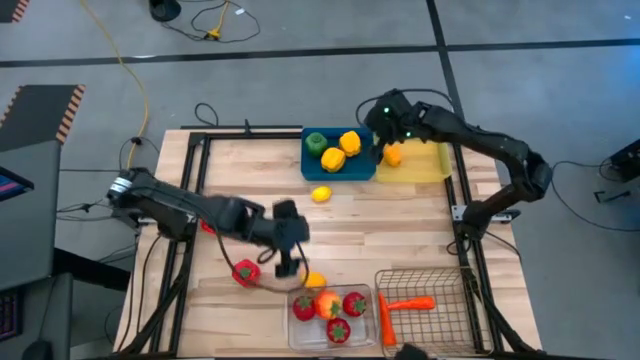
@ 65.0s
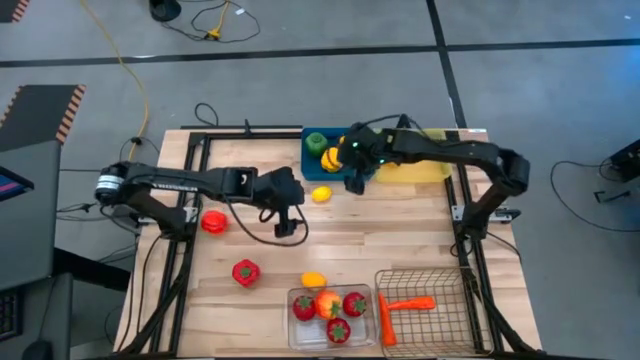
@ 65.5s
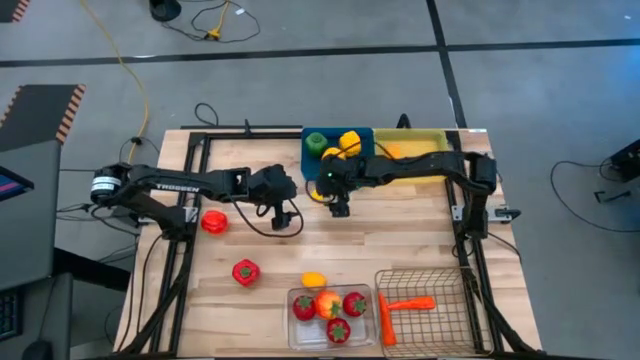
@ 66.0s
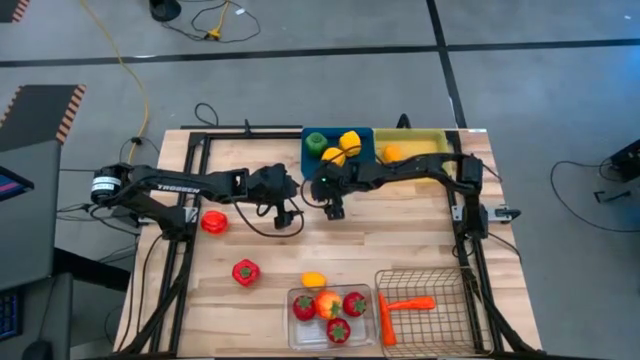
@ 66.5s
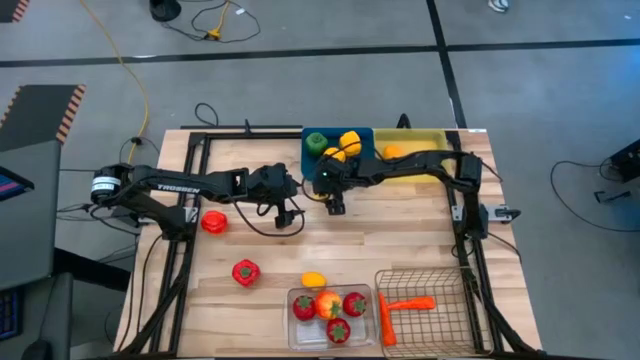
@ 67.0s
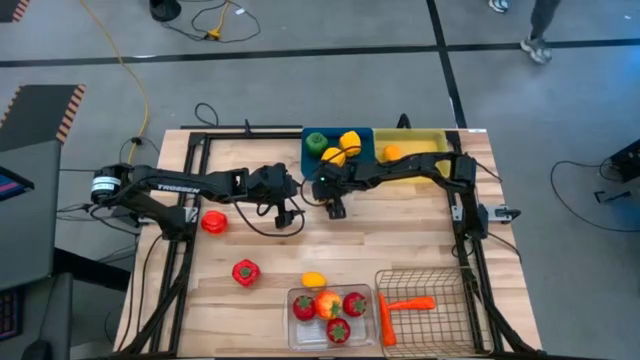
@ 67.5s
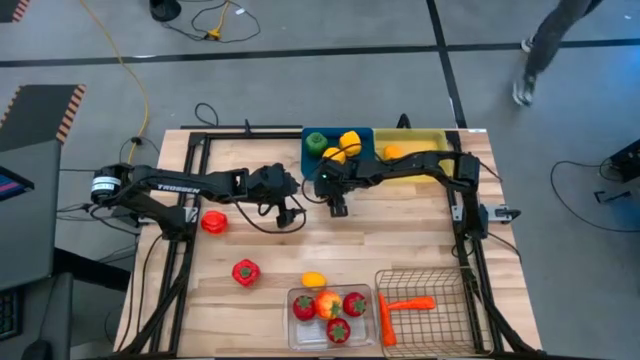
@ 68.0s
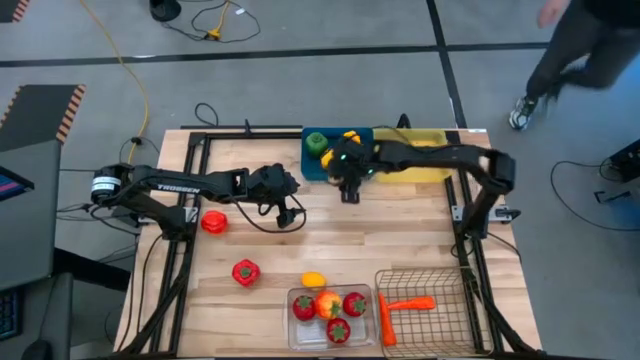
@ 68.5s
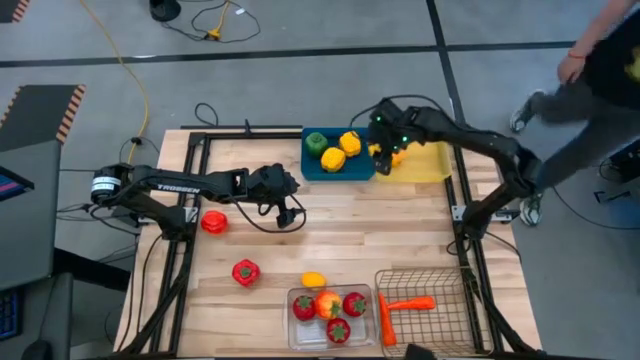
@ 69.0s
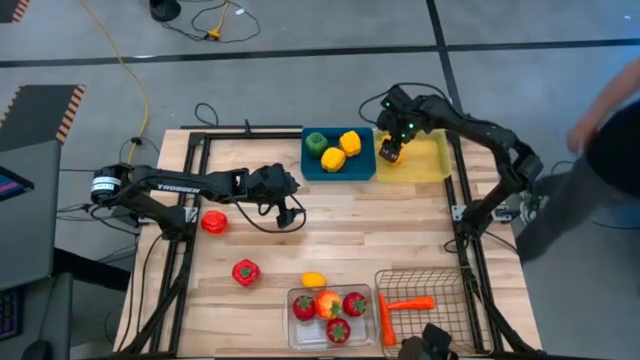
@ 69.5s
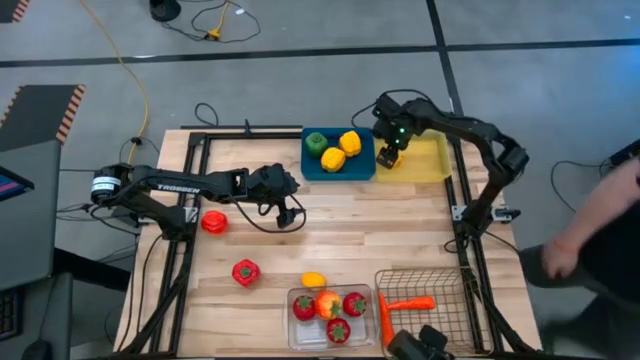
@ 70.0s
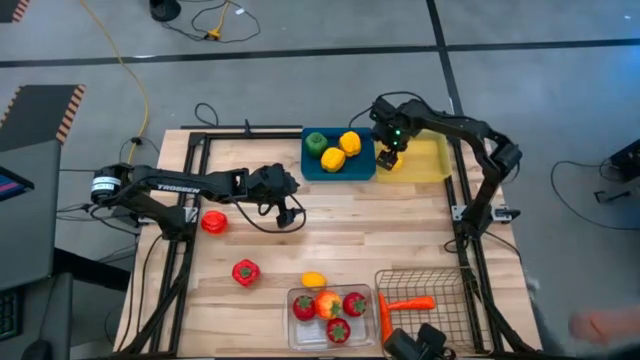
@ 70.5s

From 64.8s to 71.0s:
Task: Sort produce into baskets
Put the lemon into the yellow bin

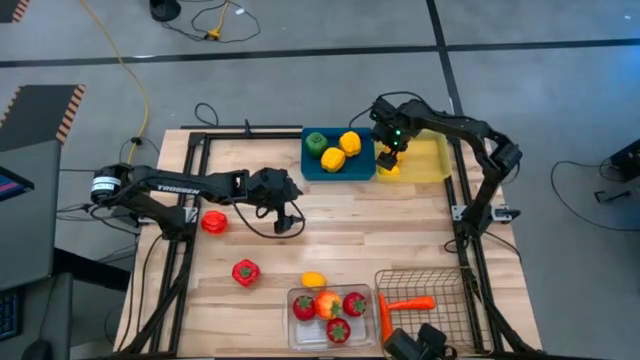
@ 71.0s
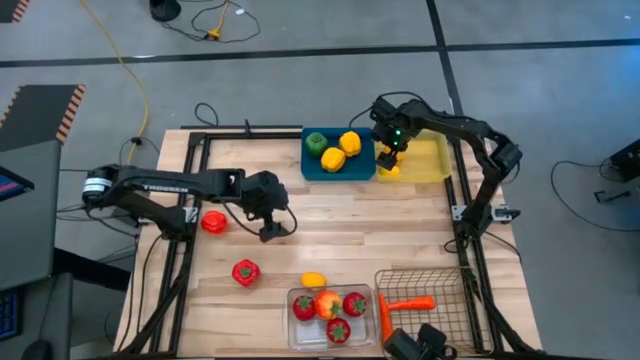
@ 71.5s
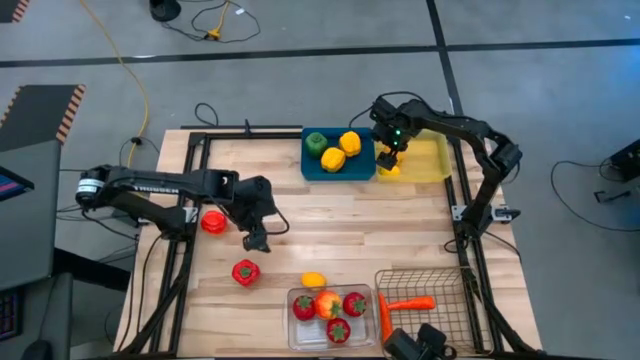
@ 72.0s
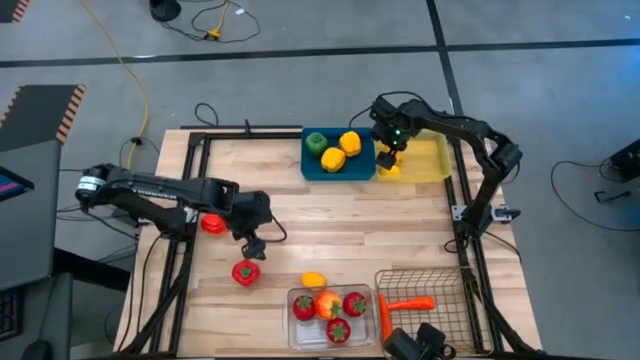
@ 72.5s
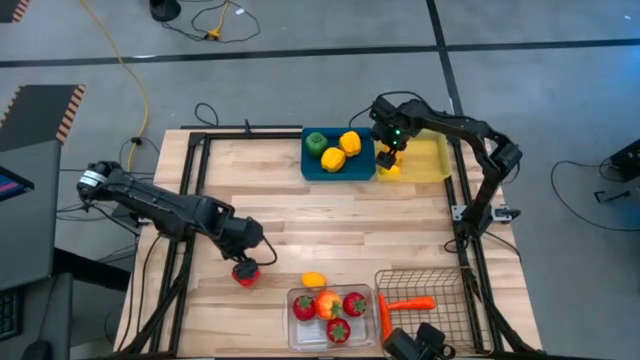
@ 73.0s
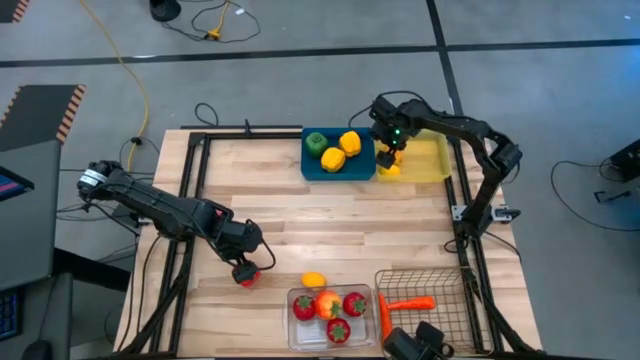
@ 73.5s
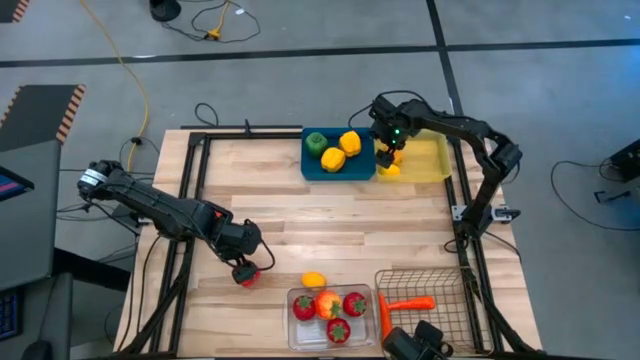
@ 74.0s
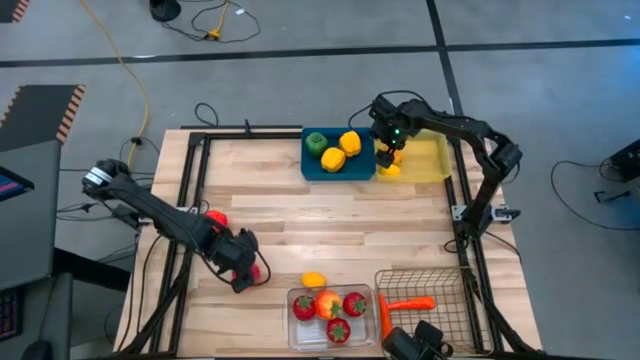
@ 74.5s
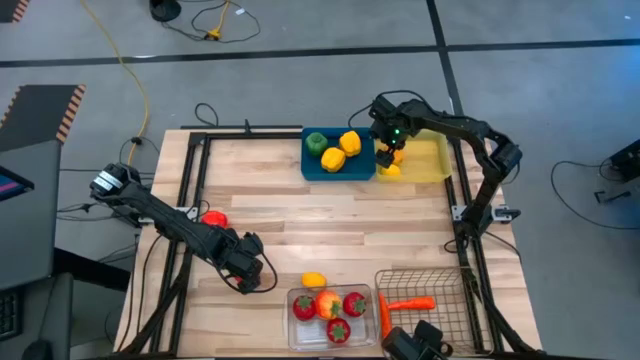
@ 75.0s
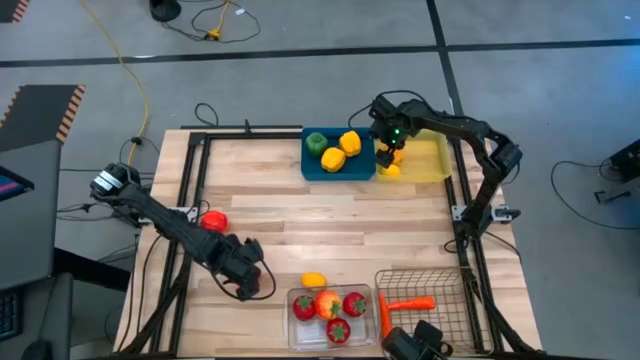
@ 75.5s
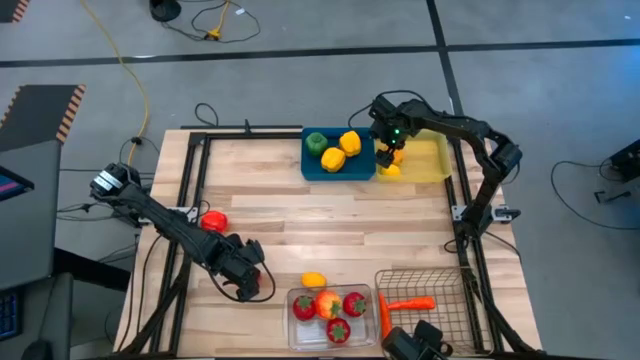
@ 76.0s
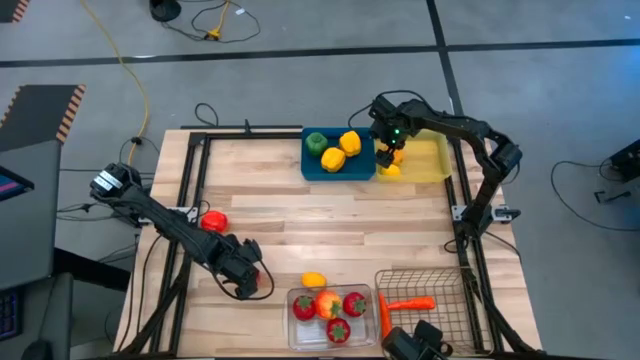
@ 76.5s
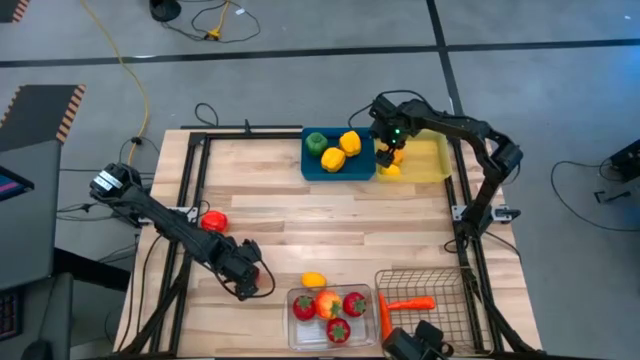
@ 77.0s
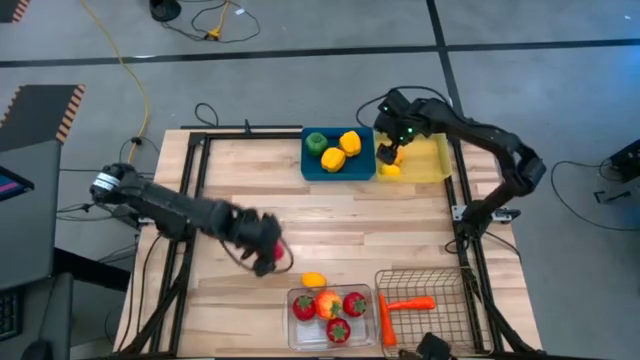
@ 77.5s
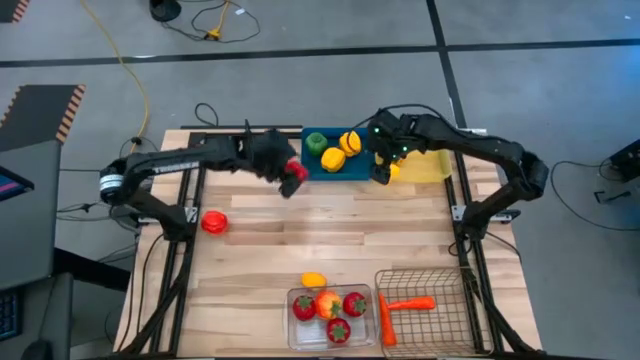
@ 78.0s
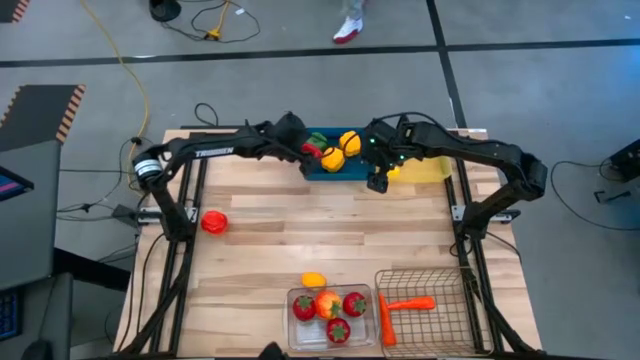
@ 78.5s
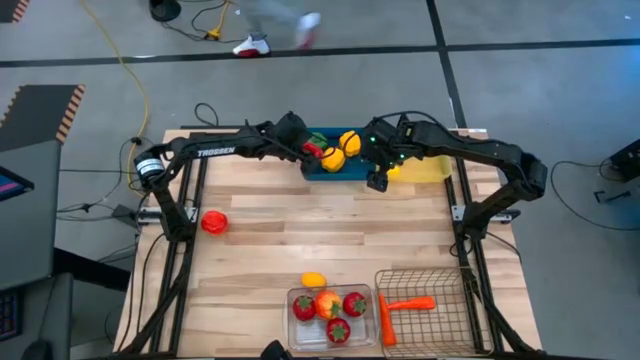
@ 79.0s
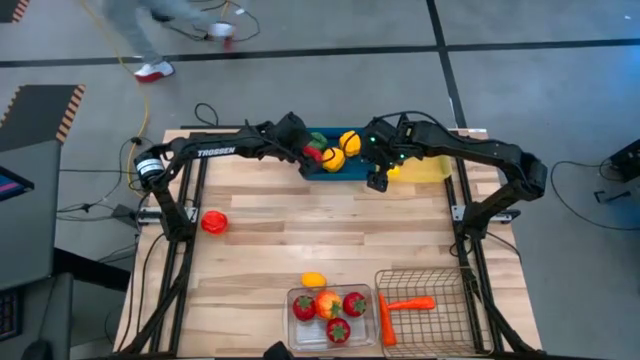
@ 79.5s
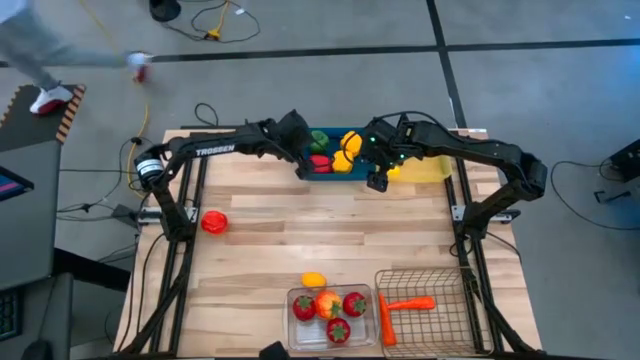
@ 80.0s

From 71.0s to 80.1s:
Put the red bell pepper into the blue bin

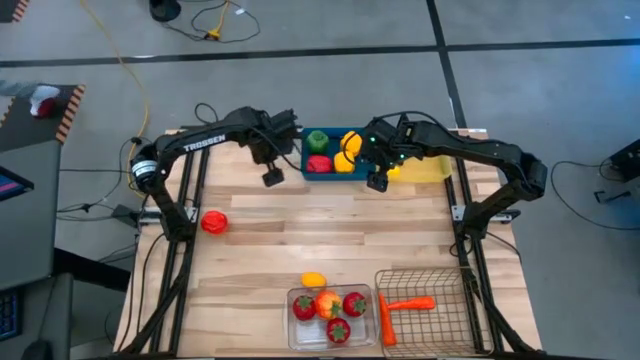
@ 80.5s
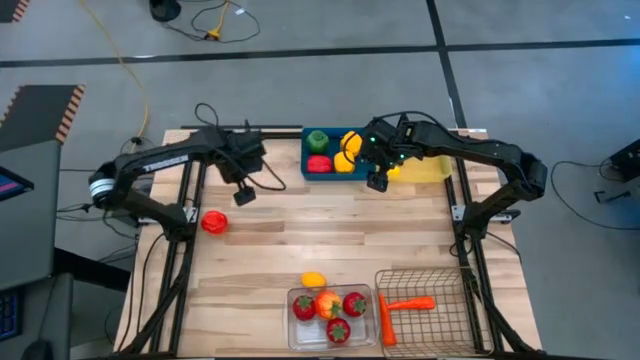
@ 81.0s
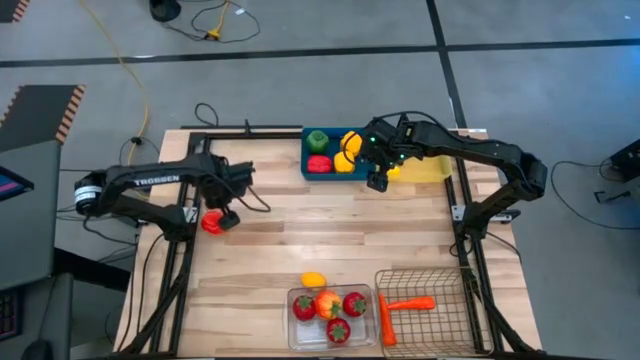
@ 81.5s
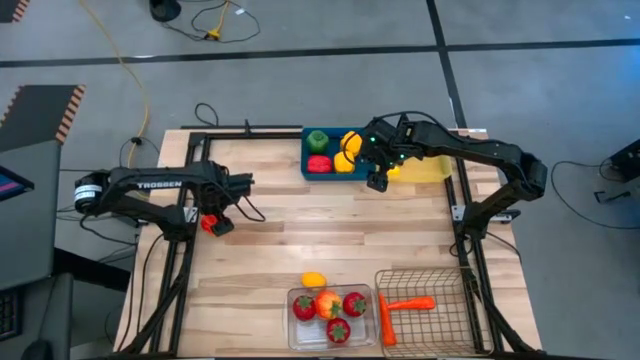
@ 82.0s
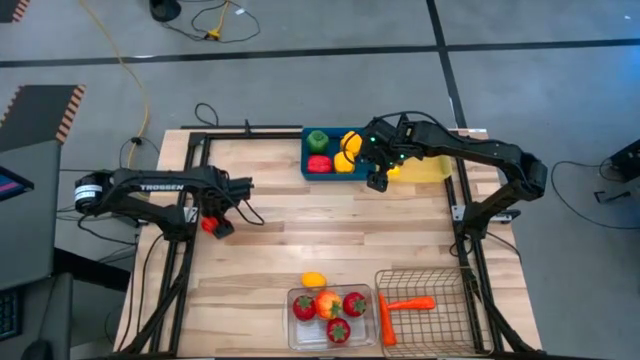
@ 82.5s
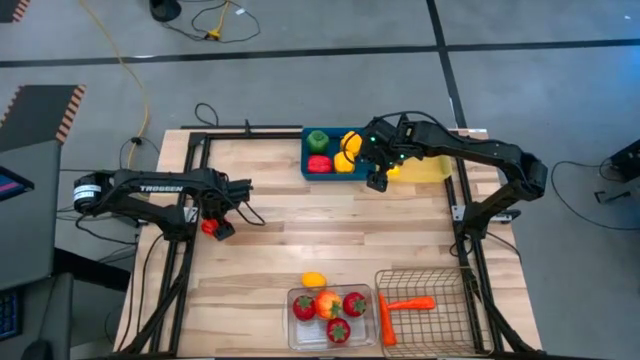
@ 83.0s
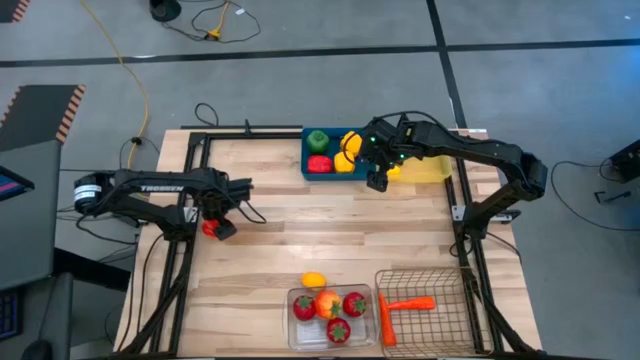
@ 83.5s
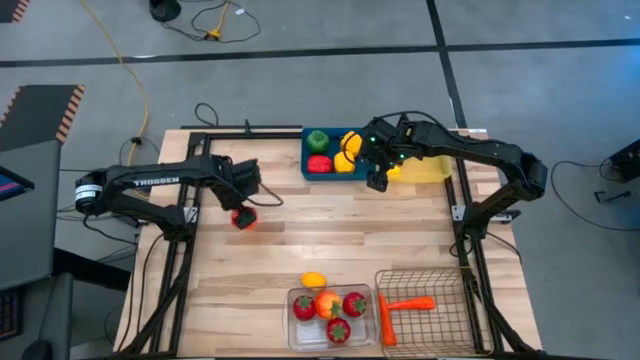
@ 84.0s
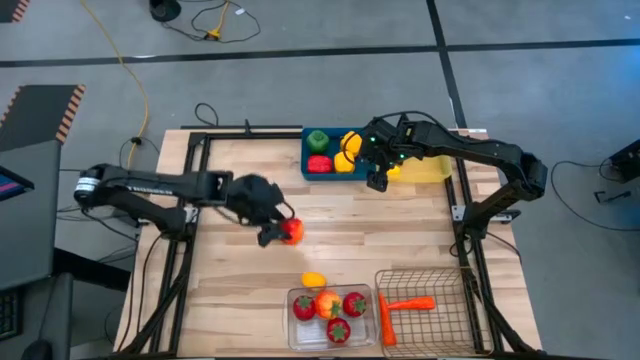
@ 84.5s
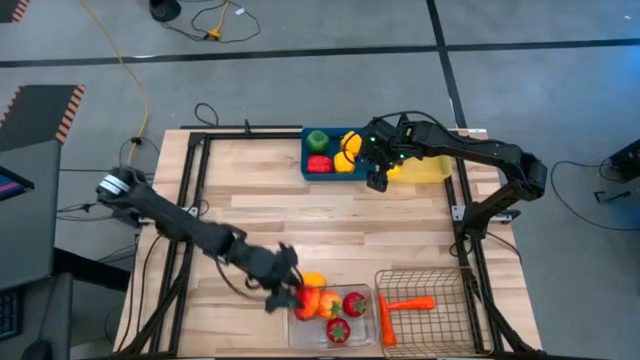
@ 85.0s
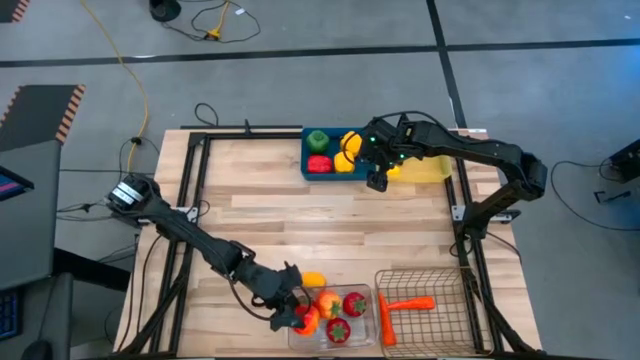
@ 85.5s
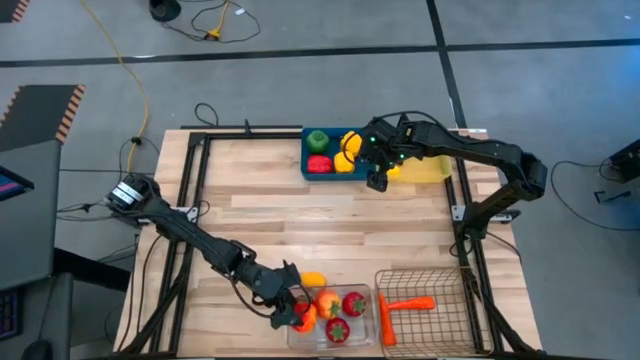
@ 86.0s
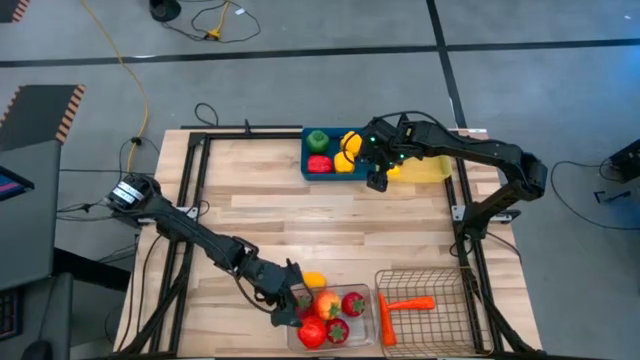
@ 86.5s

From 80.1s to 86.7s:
Put the tomato into the transparent bin
